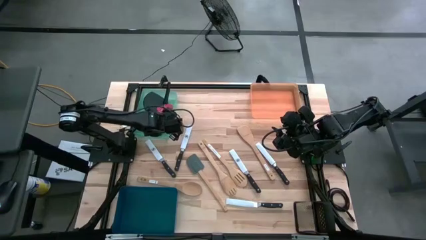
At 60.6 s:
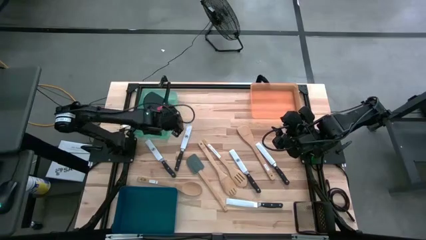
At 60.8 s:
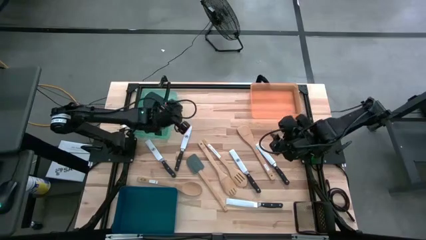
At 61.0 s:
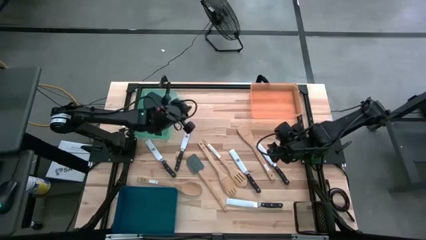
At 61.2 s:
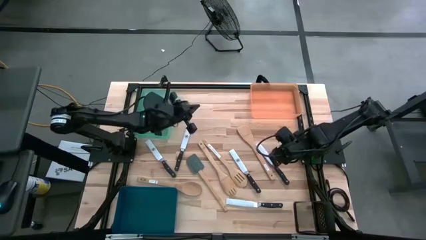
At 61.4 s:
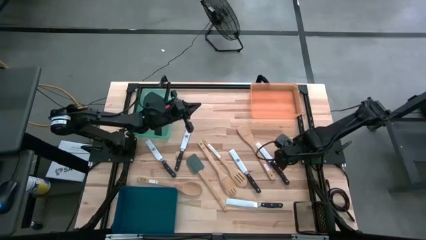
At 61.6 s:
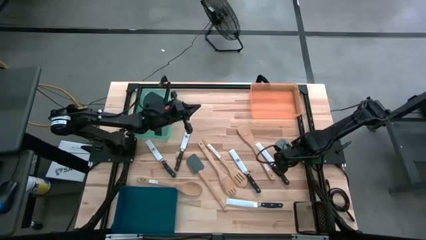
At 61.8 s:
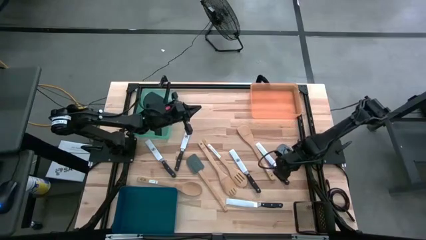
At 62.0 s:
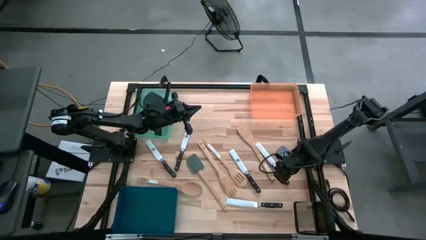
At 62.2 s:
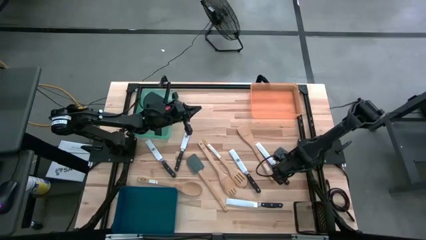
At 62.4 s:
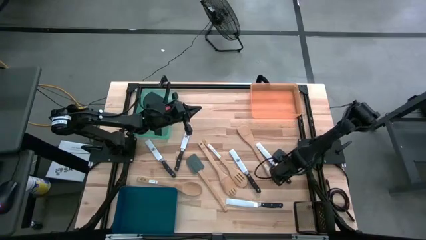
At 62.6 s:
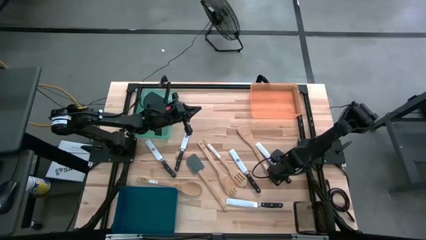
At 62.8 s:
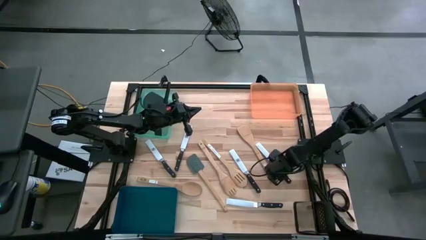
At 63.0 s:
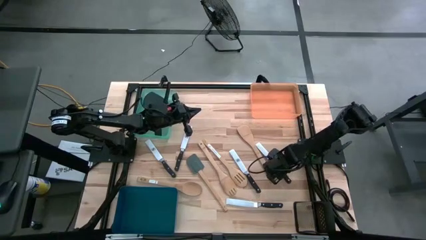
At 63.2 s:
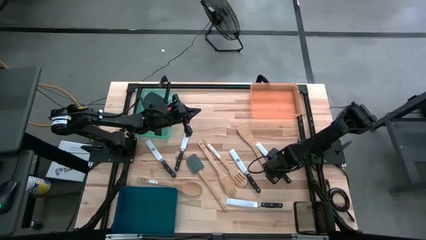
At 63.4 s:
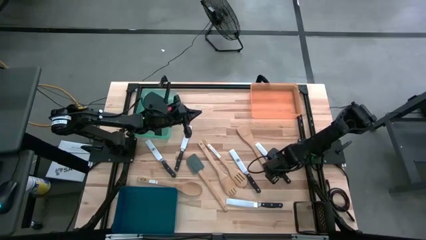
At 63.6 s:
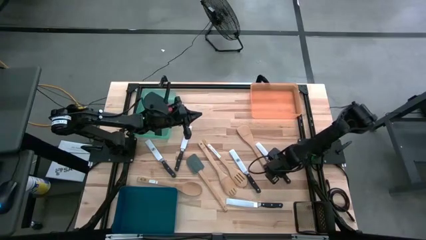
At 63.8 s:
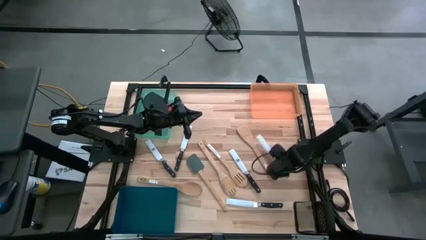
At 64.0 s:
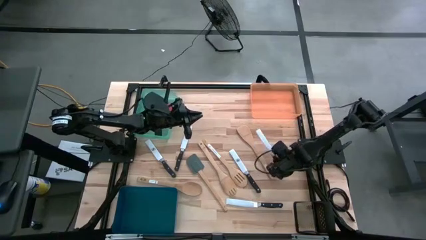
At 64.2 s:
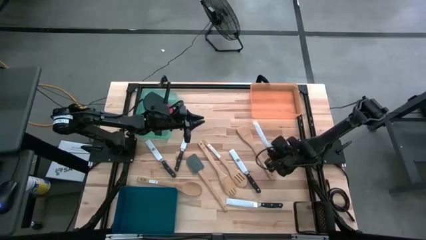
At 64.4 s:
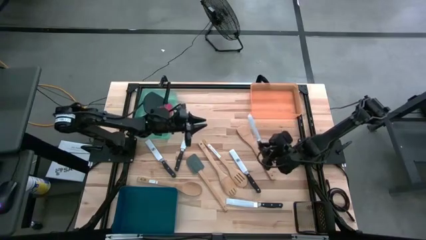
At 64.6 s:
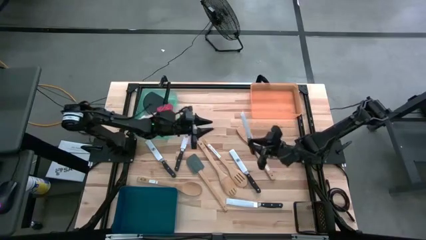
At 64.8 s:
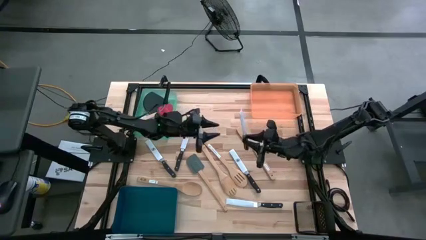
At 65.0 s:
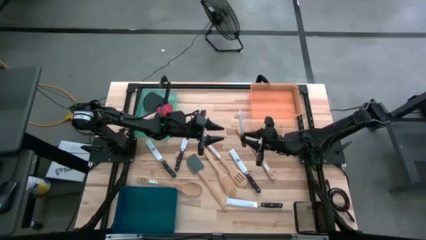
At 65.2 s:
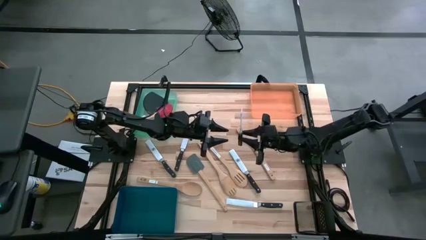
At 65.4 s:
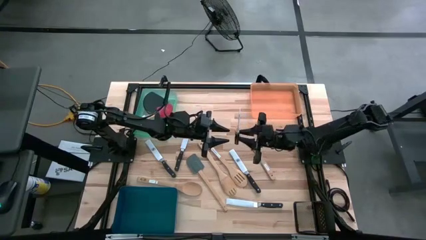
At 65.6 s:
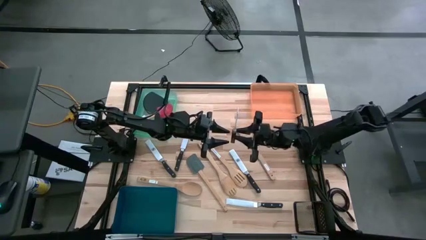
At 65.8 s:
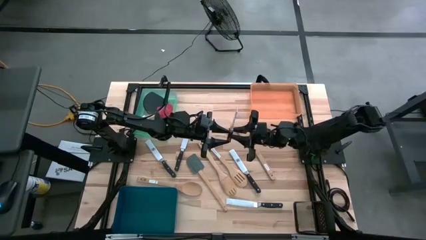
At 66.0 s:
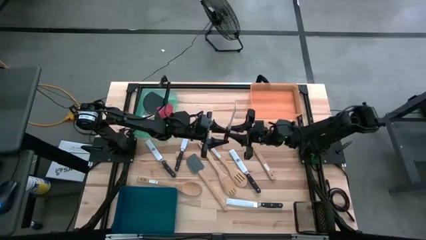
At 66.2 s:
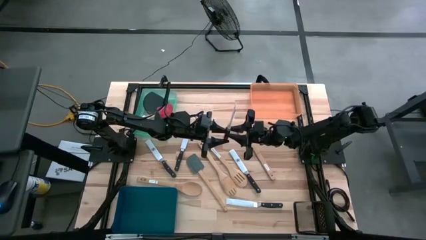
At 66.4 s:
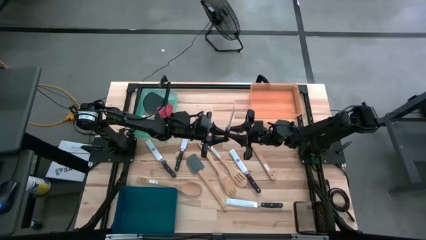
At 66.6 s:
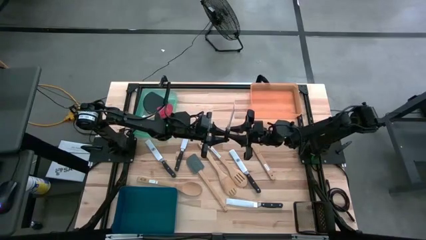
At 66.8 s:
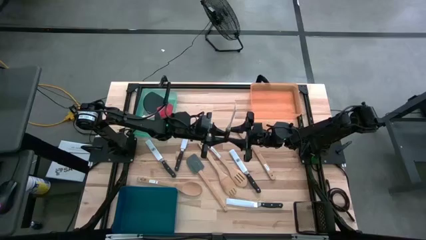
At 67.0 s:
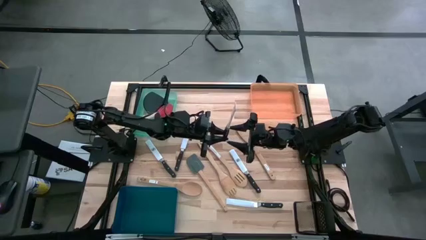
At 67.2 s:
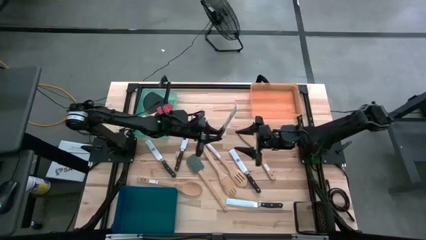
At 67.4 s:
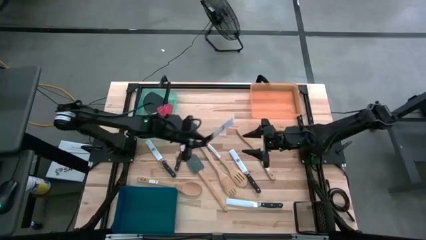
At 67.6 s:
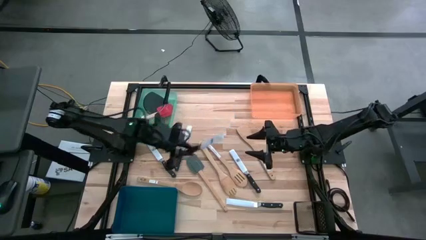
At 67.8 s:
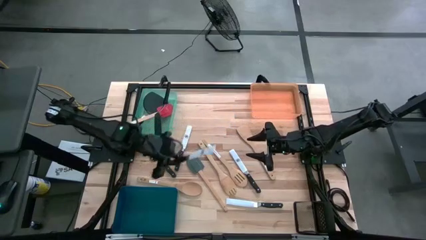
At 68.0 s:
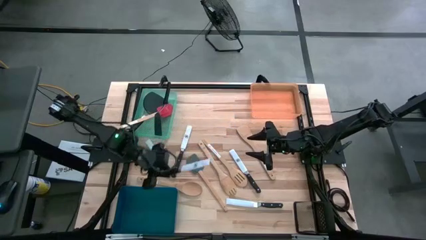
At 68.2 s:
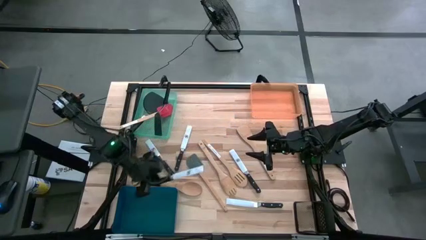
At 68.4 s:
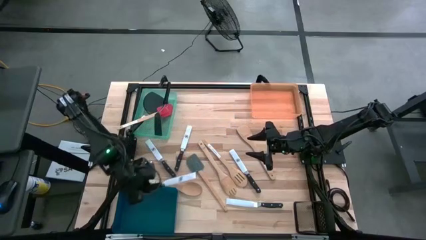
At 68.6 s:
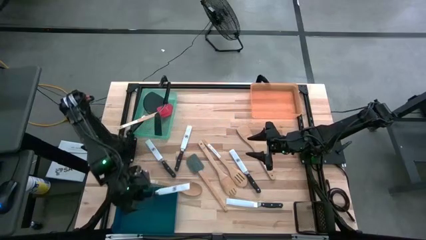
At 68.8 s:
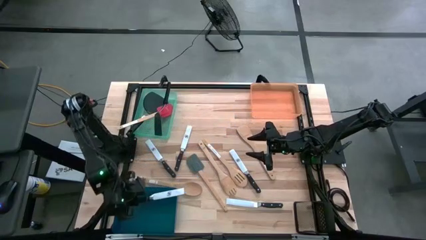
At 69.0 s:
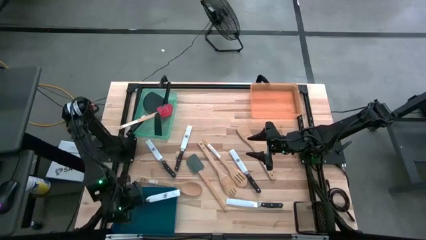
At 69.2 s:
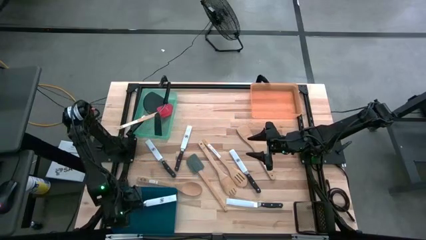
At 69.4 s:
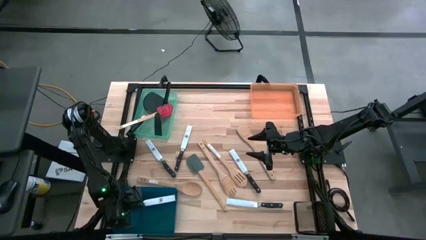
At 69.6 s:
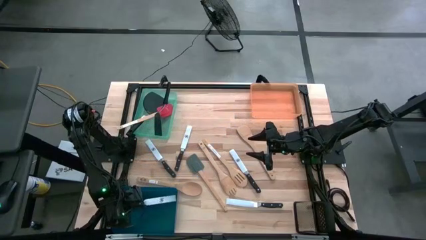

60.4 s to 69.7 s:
Task: Pick & Place Kitchen Items
Put the black knife into the blue bin

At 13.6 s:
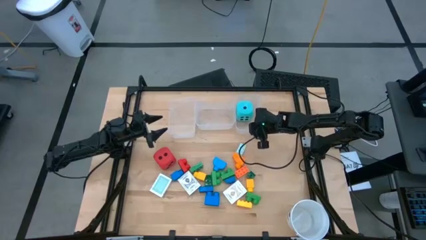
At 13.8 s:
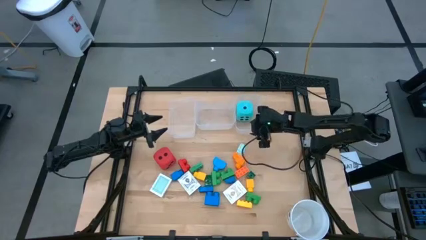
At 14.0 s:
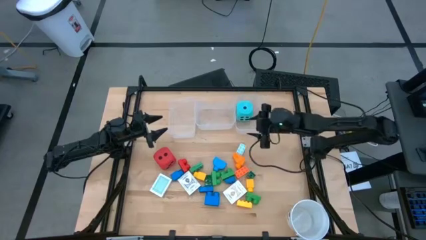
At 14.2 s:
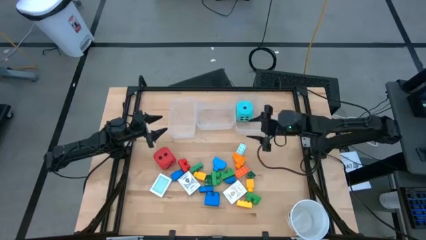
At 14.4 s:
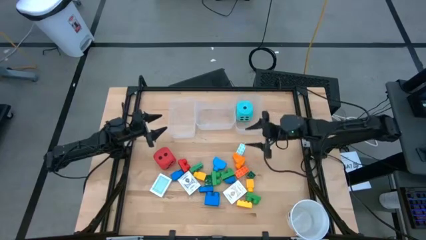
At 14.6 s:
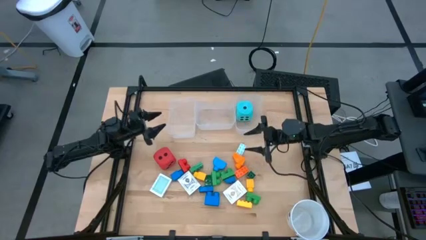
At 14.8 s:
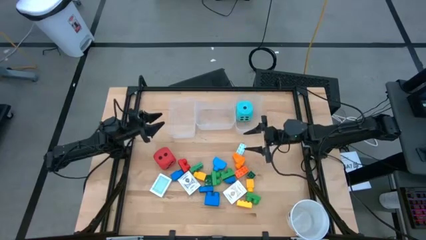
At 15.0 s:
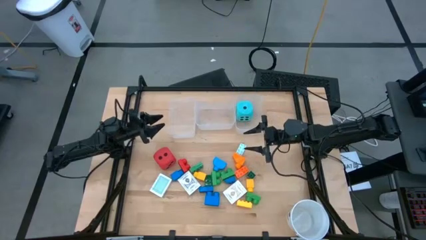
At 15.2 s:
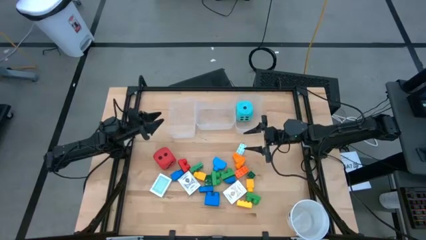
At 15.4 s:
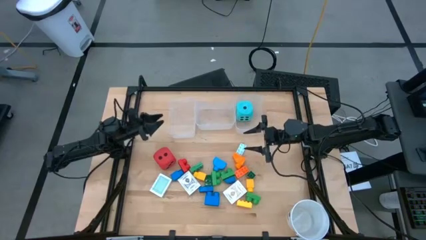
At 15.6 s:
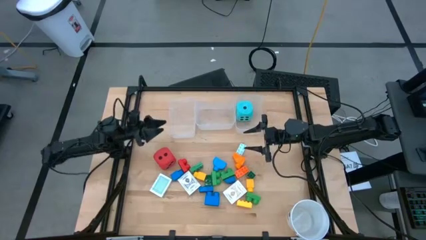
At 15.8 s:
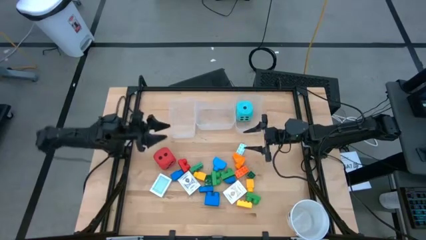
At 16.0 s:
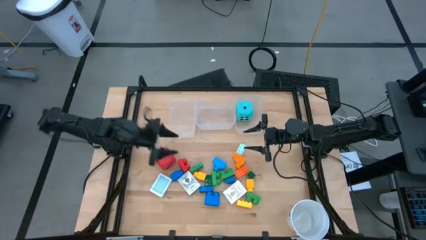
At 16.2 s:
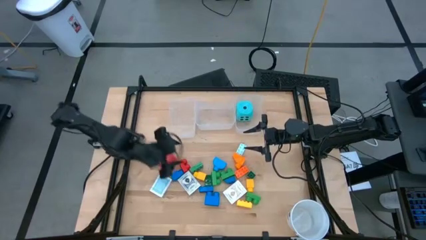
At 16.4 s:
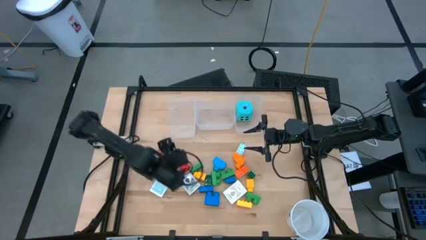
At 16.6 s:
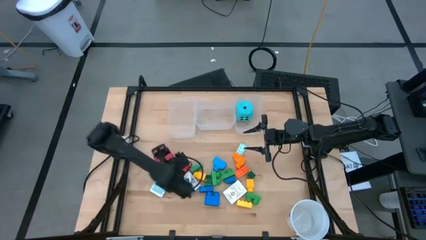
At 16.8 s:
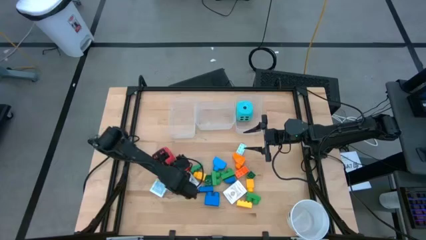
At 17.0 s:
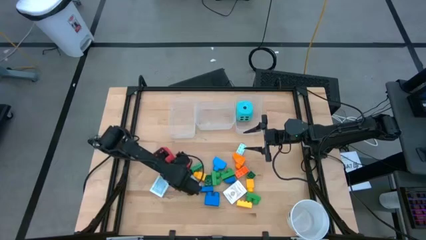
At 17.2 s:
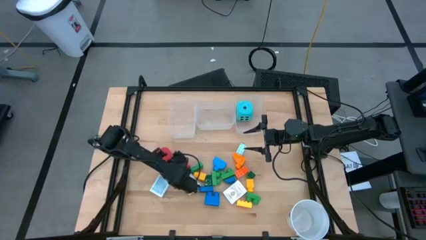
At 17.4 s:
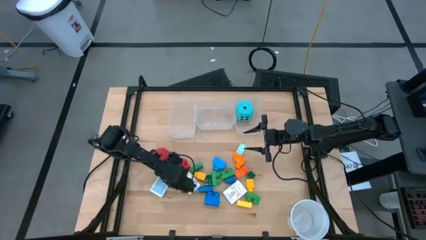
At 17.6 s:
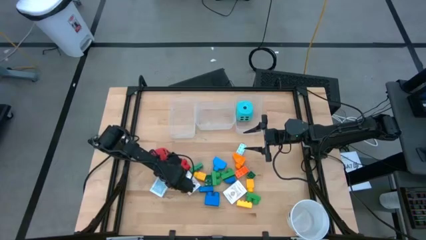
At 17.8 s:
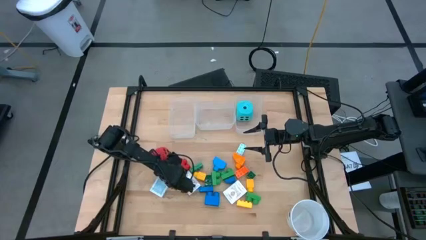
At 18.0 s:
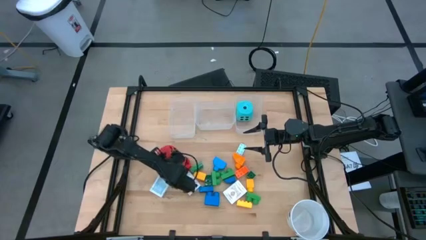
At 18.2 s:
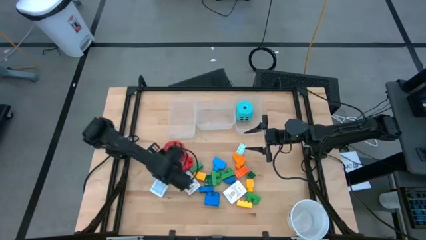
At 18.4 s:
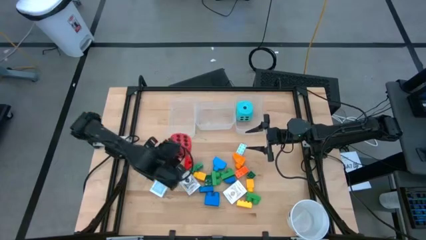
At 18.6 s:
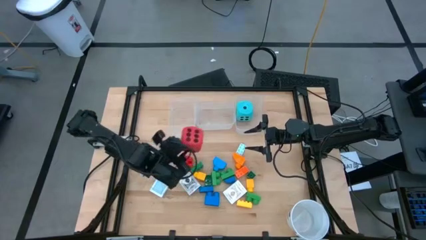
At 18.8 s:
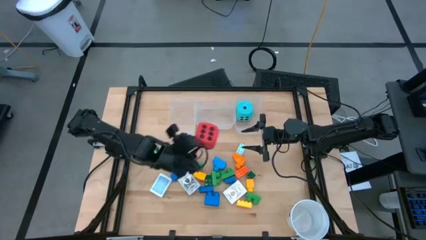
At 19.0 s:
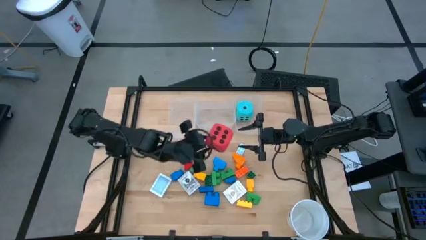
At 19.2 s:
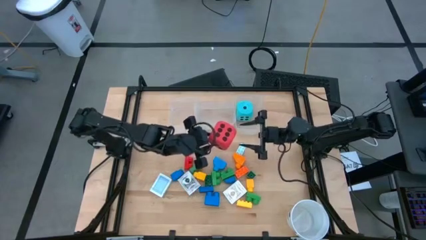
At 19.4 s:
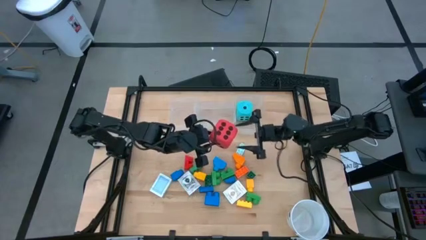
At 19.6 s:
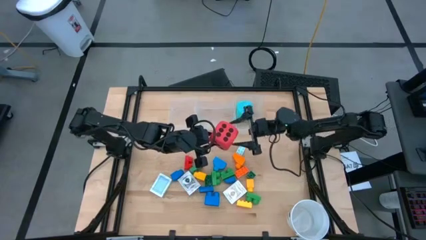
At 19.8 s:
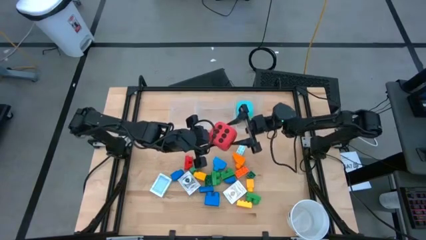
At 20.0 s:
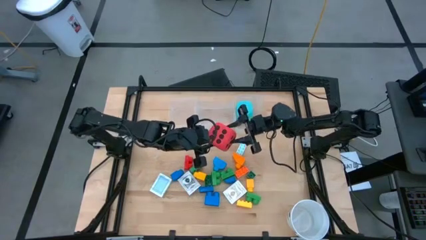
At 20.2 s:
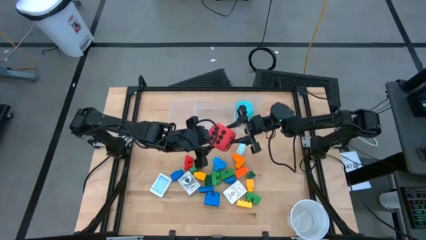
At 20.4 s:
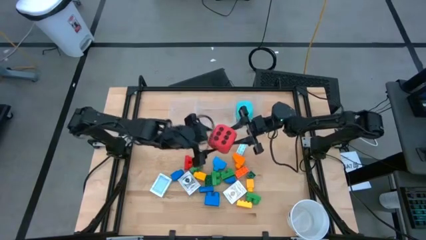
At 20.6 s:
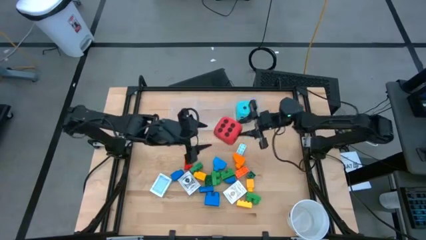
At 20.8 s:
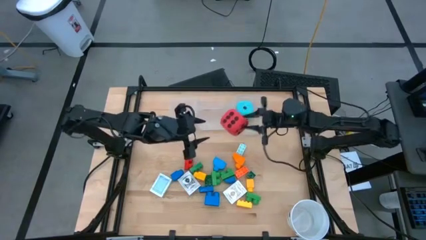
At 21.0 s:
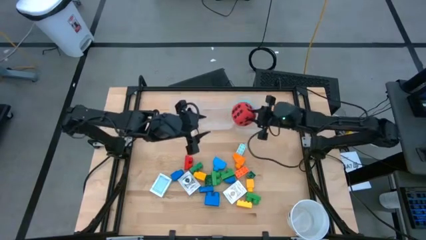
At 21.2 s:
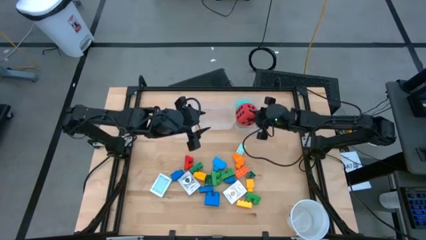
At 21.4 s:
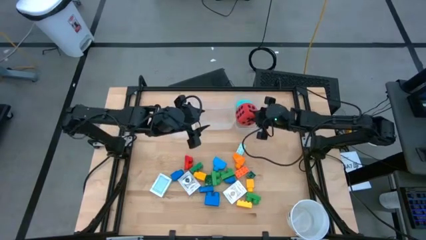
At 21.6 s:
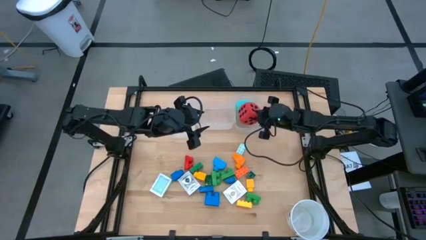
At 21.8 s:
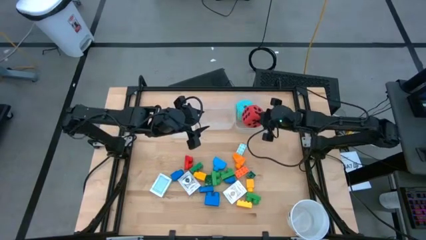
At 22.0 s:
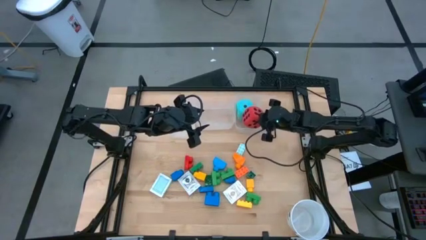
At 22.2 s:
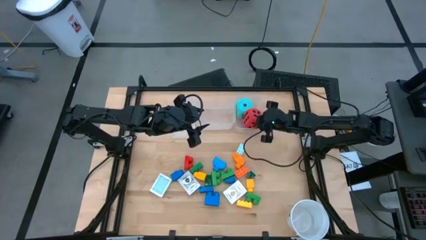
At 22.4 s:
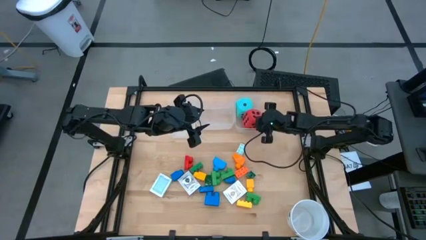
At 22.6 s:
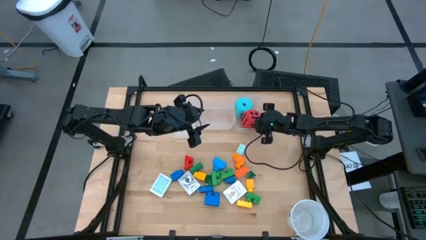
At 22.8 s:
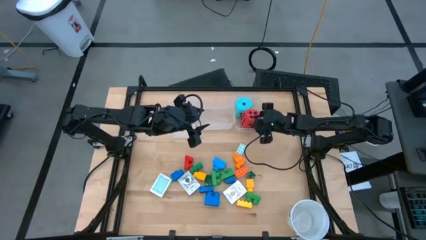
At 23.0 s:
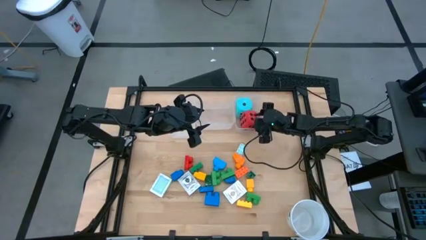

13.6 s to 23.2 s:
Task: Pick & Place Toys
Put the red dice into the right transparent bin
